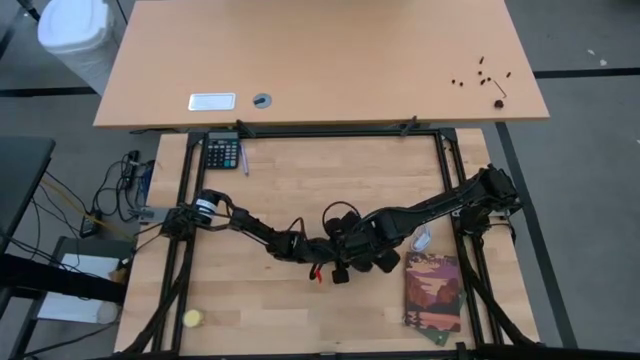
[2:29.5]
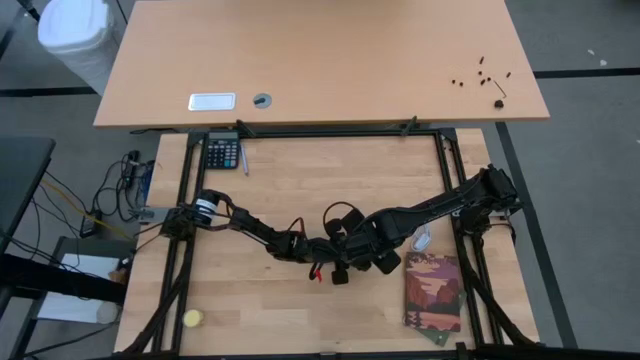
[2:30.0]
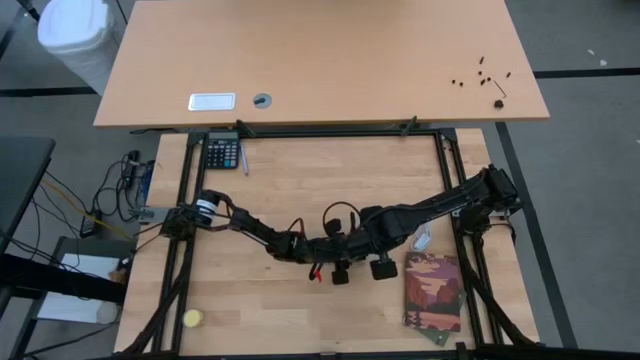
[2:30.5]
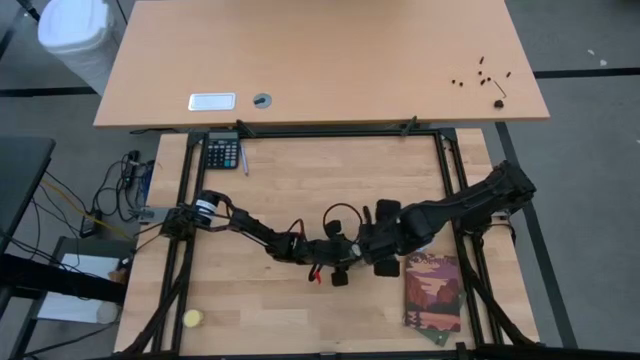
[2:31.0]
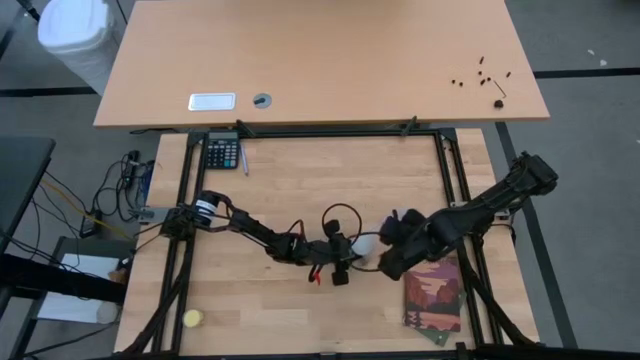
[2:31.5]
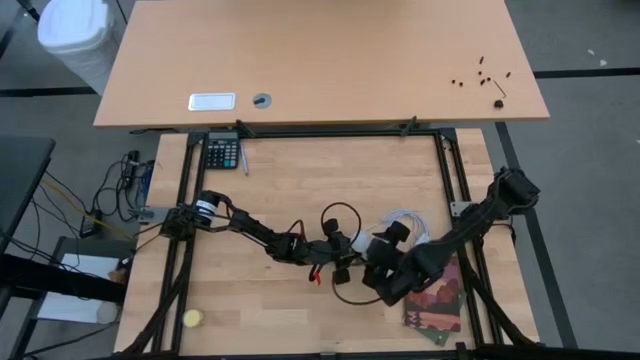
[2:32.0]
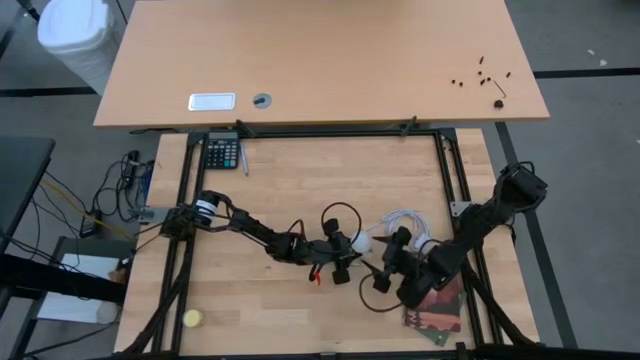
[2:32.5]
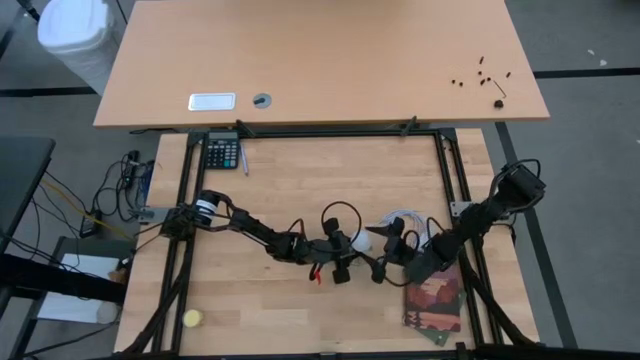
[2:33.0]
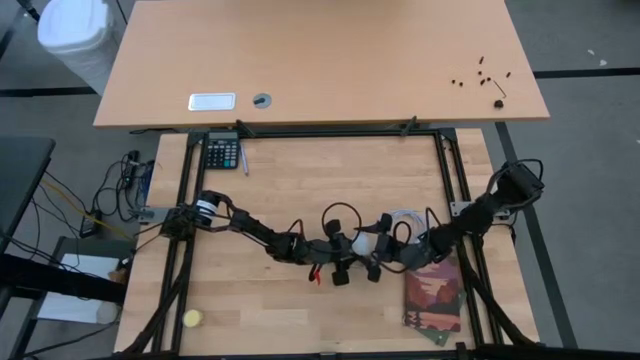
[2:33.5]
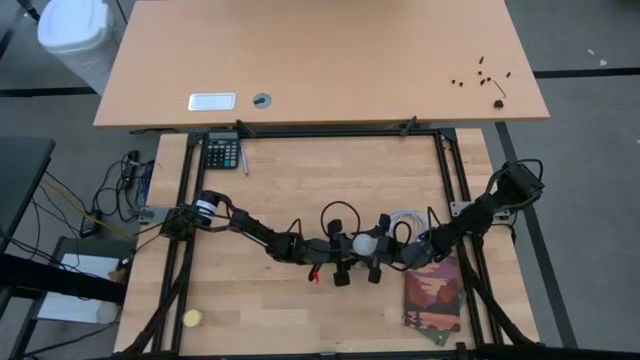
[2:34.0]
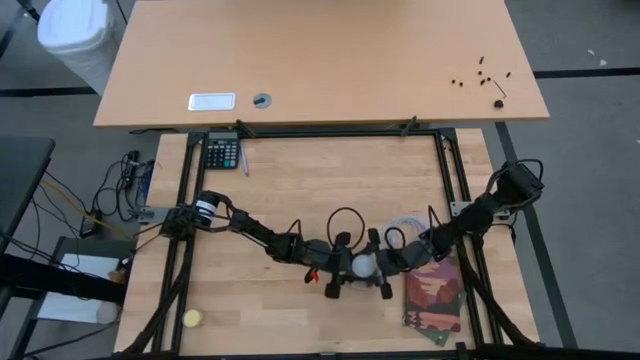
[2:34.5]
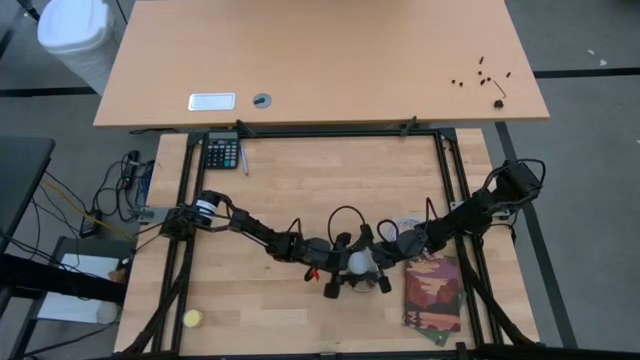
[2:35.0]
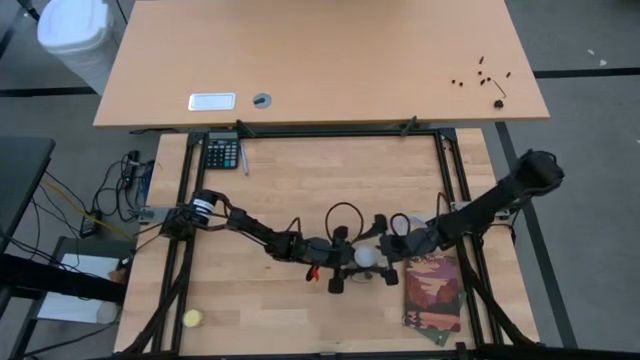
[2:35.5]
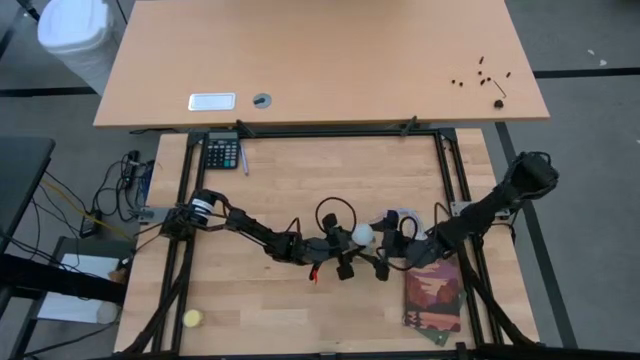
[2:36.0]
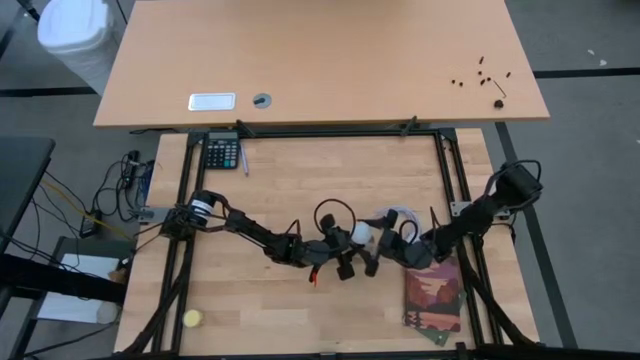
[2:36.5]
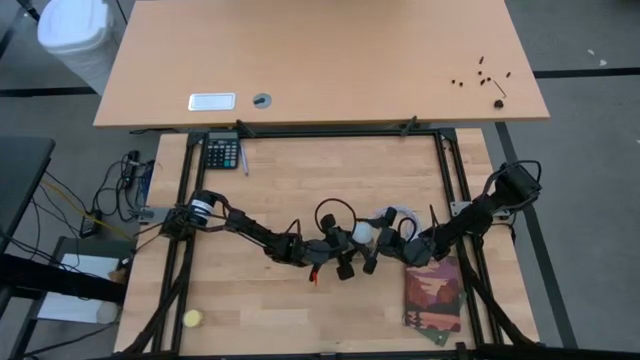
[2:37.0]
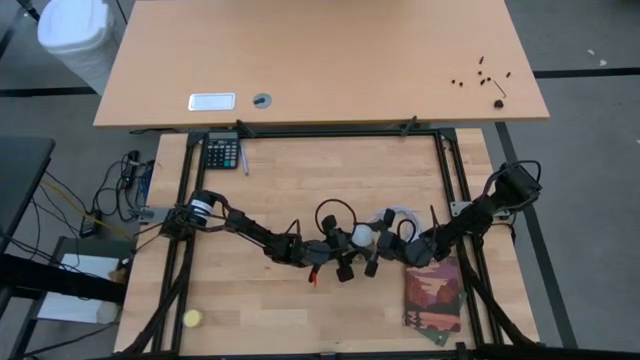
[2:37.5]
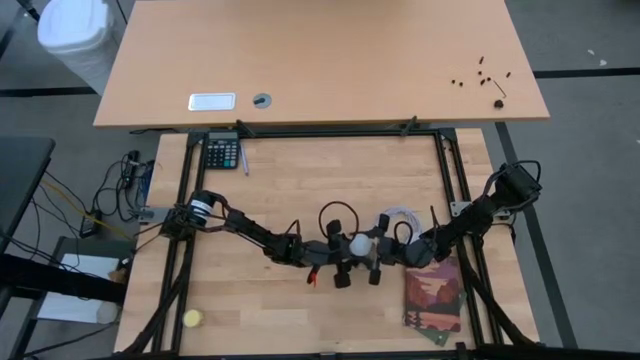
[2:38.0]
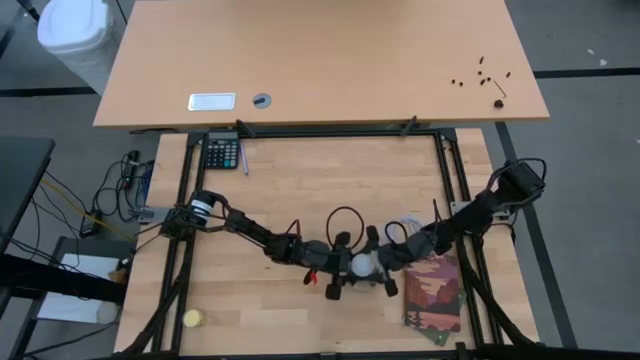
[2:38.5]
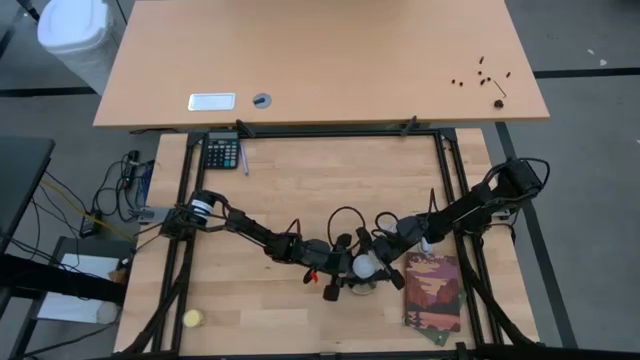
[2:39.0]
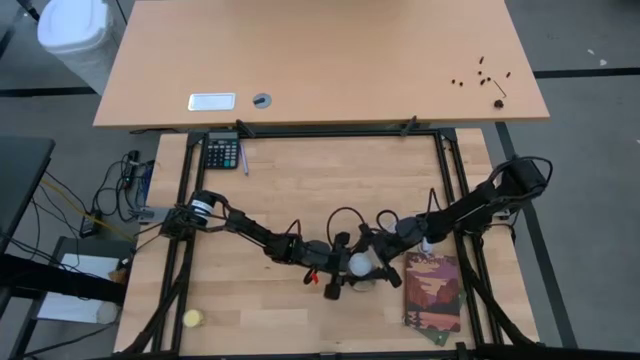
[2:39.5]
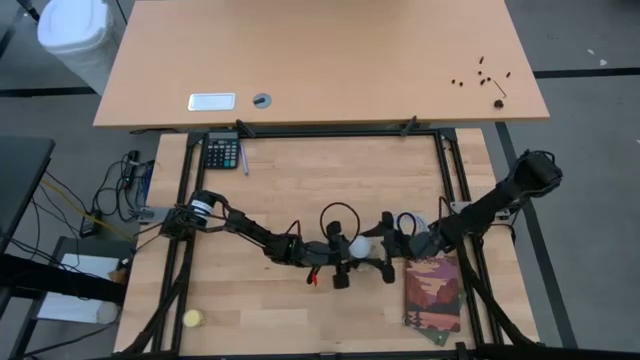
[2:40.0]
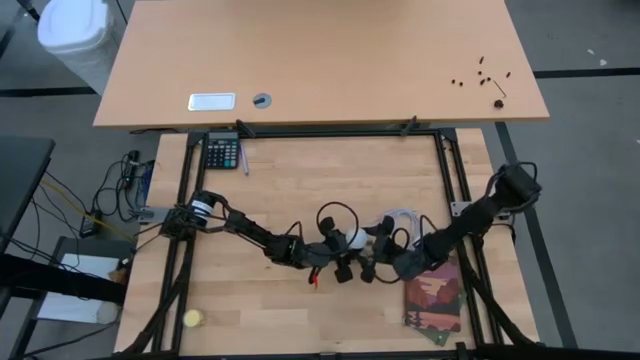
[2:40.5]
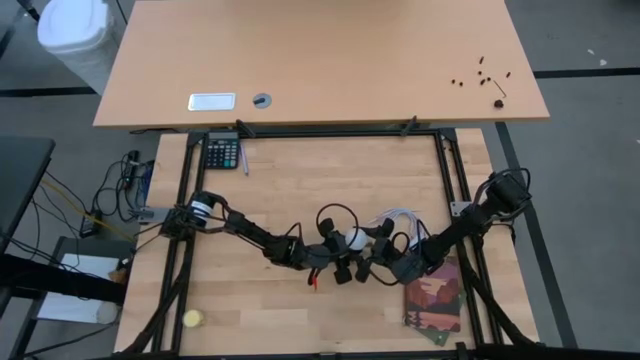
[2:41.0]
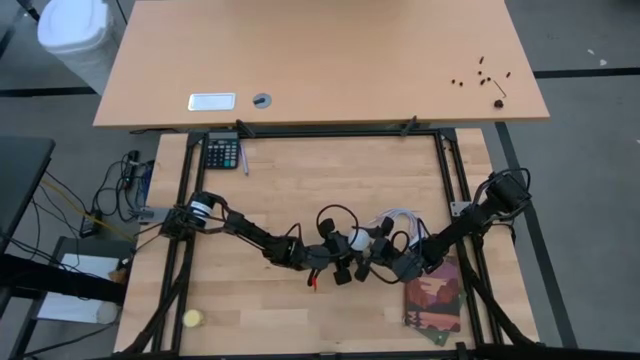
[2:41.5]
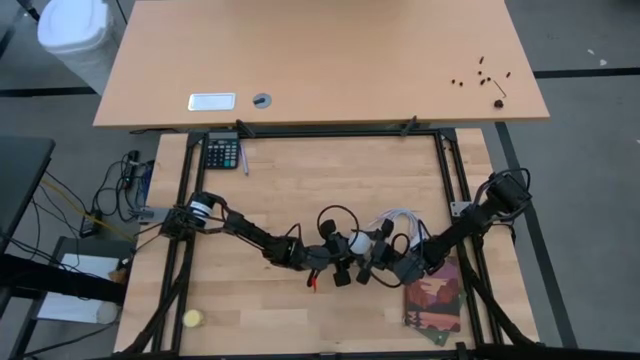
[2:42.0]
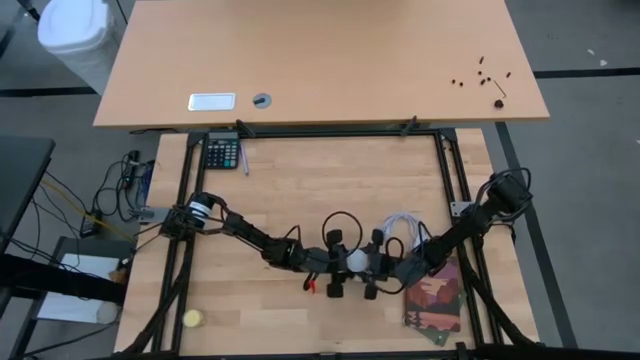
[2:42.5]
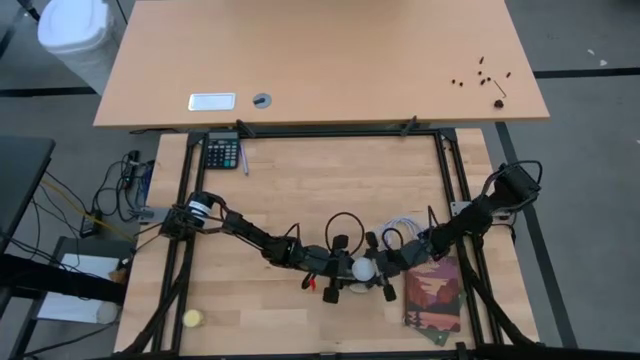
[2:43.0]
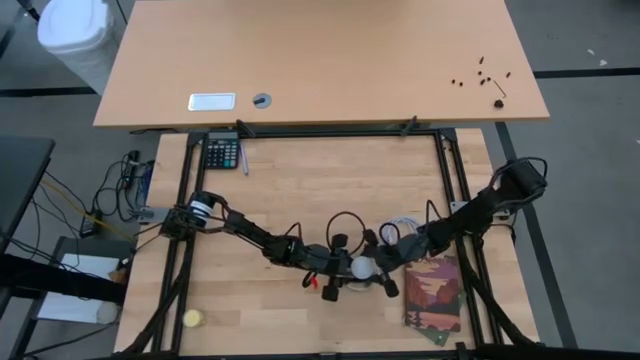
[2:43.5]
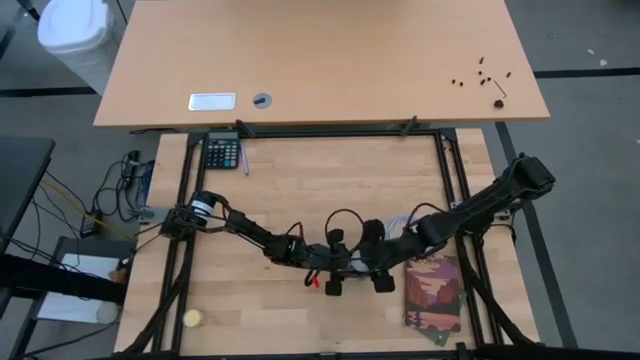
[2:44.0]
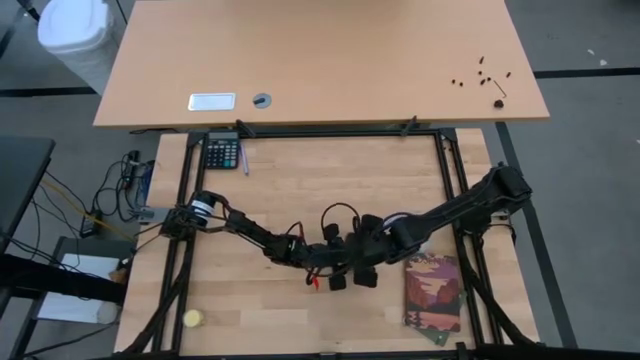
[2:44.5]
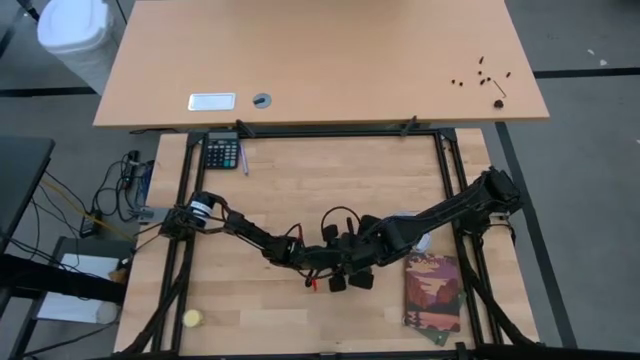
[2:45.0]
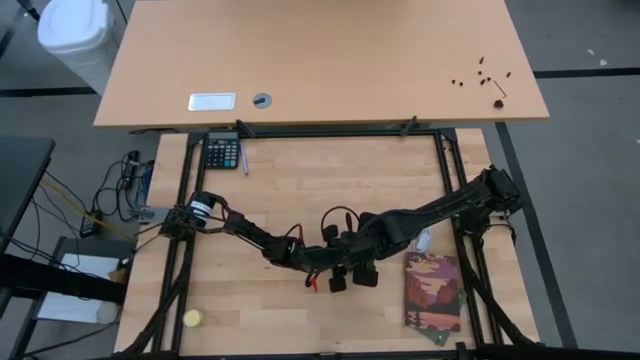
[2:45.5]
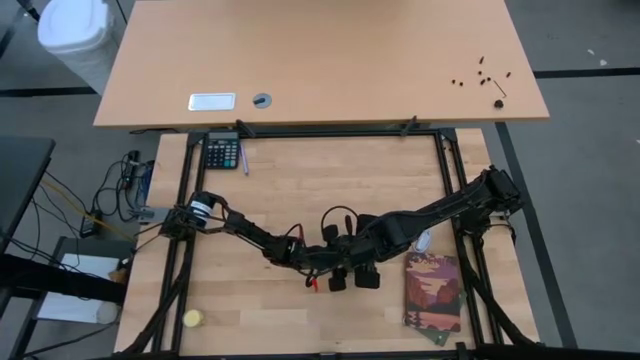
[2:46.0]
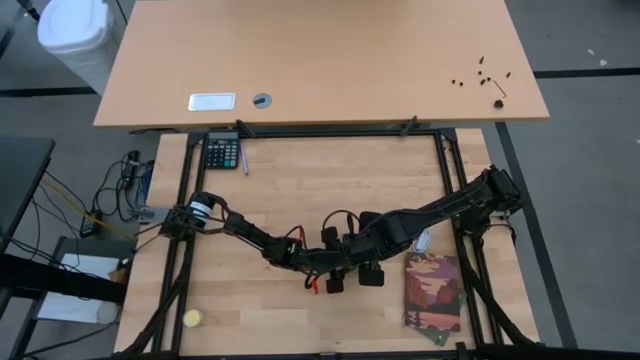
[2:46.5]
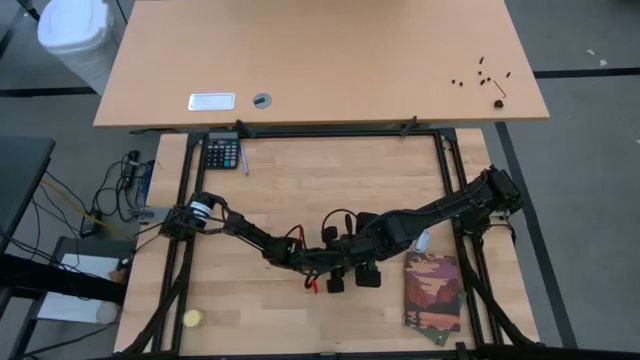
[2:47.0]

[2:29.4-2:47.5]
Task: Screw lightbulb
Remove the lightbulb from the lamp socket

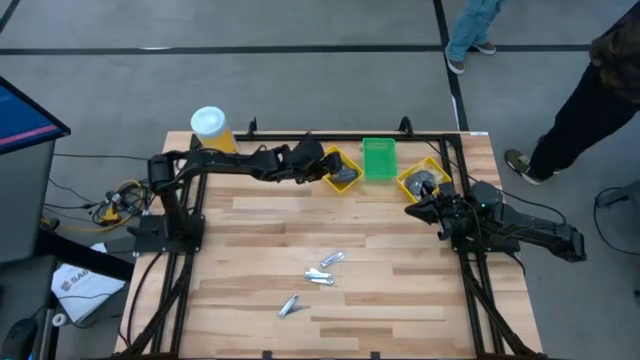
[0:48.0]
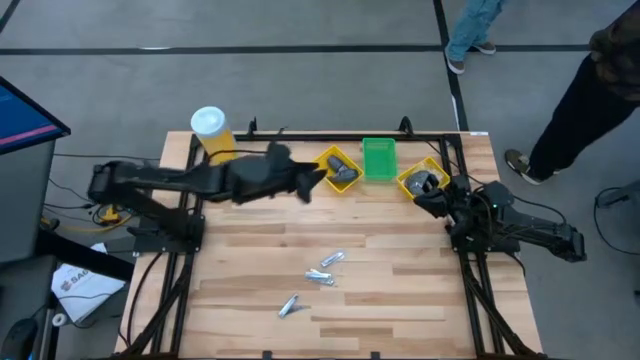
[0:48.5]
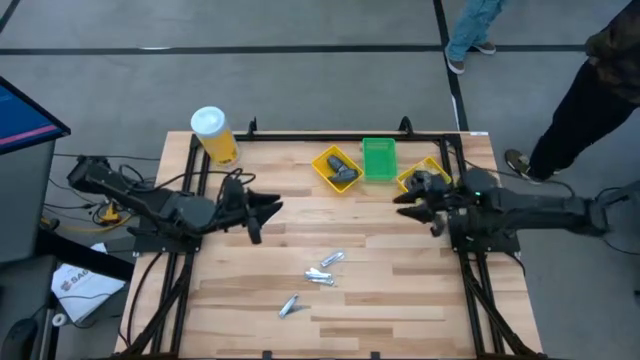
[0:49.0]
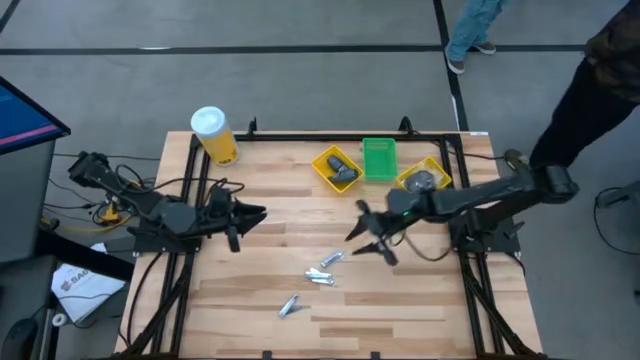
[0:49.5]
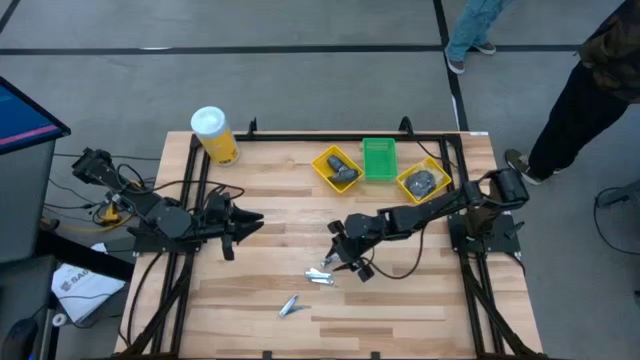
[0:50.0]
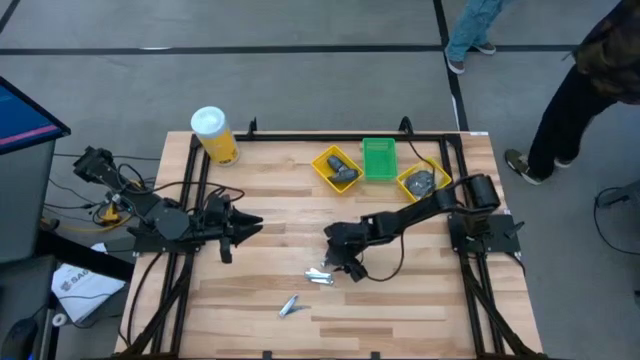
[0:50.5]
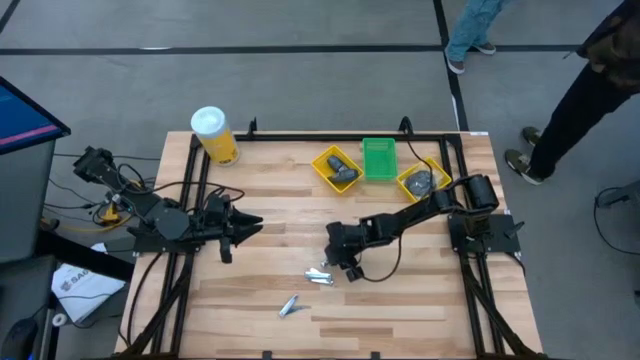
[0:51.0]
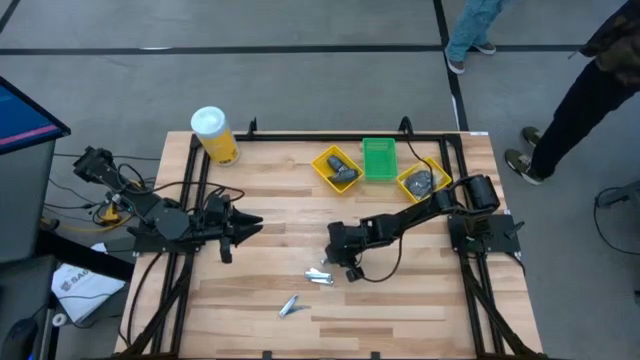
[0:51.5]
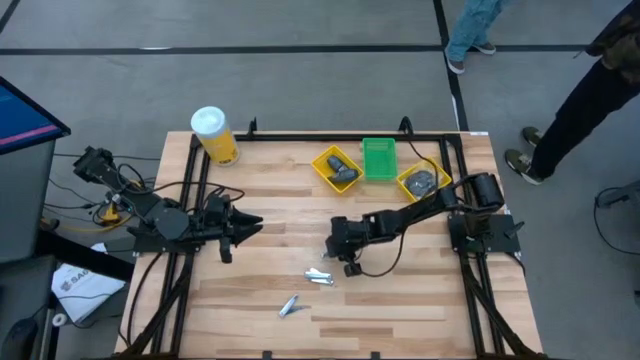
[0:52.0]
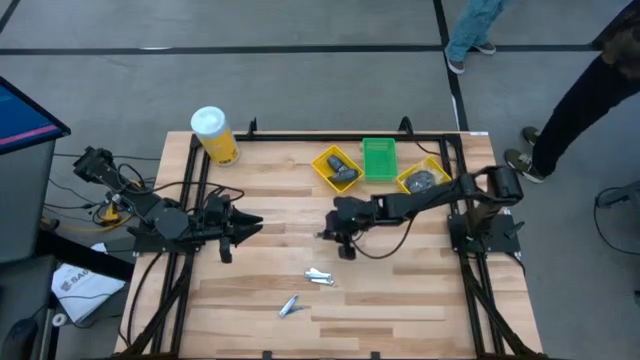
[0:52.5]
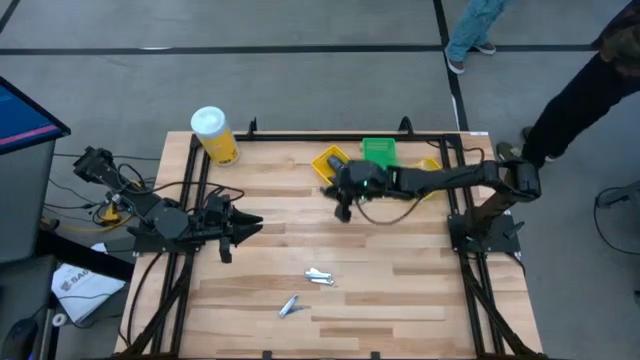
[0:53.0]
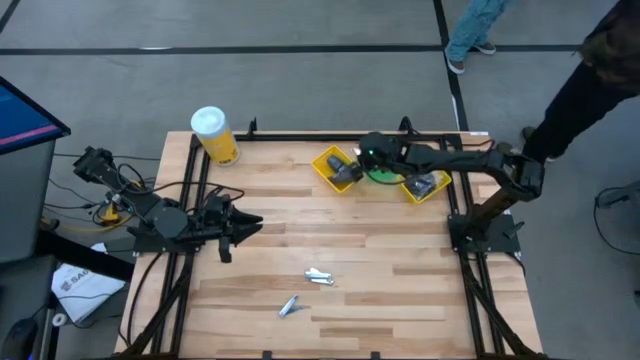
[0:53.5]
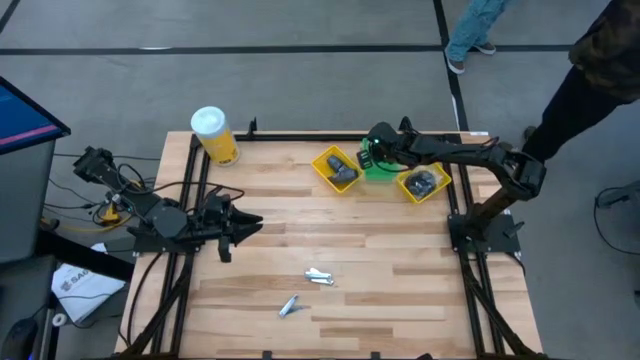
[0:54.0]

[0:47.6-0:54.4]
Task: Pick & Place Travel size toiletries
Put the silver nail cutter into the green basket
